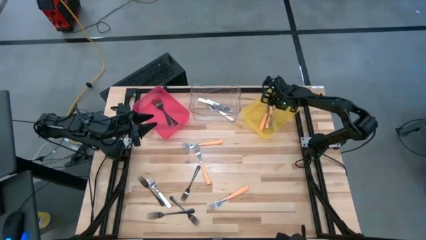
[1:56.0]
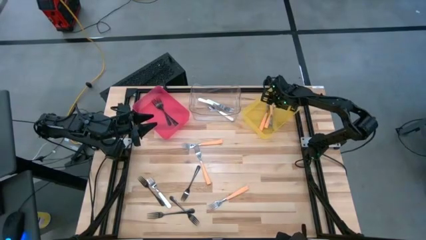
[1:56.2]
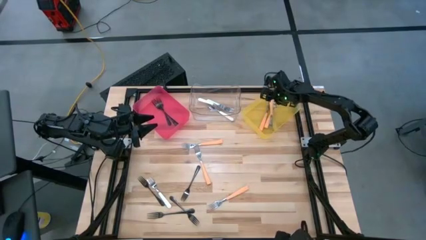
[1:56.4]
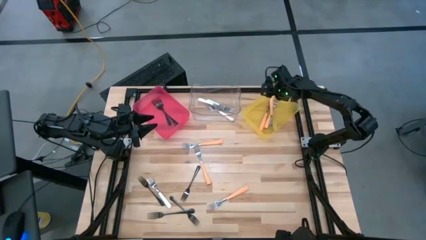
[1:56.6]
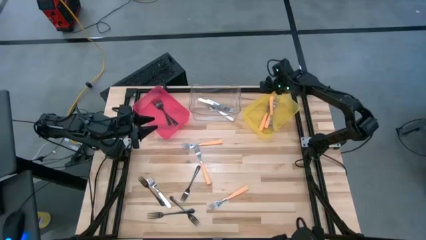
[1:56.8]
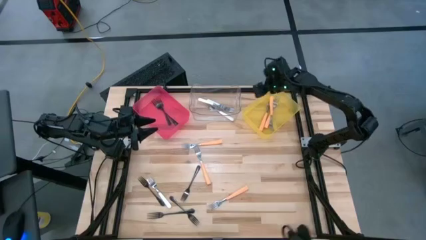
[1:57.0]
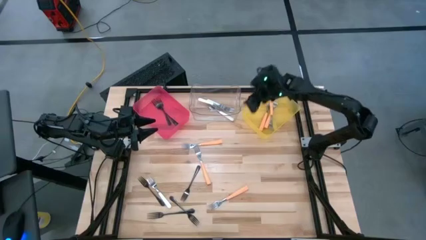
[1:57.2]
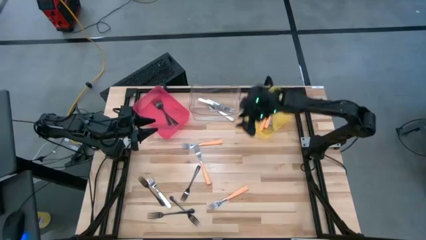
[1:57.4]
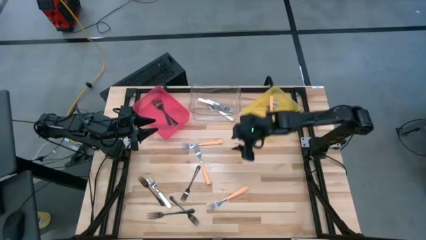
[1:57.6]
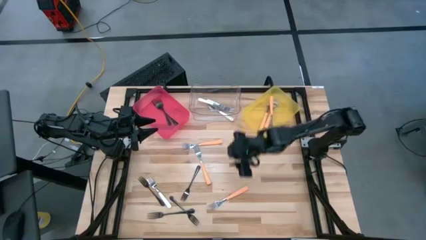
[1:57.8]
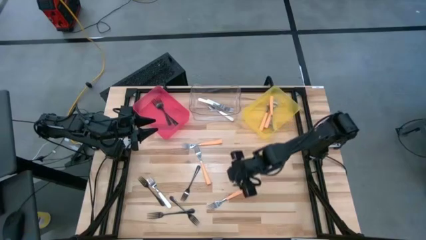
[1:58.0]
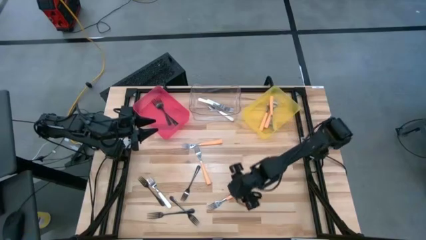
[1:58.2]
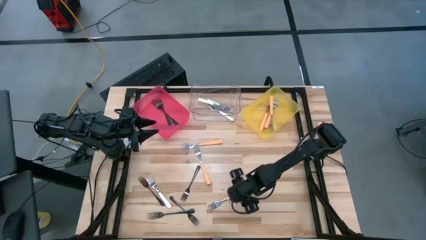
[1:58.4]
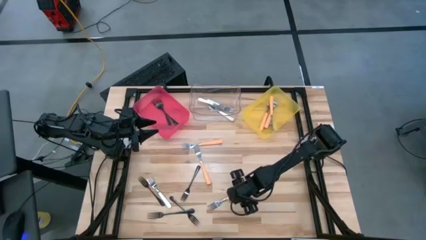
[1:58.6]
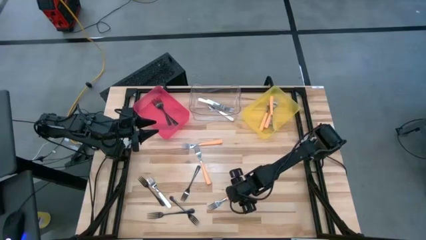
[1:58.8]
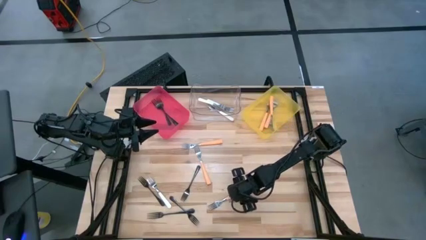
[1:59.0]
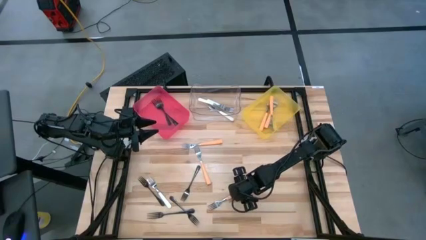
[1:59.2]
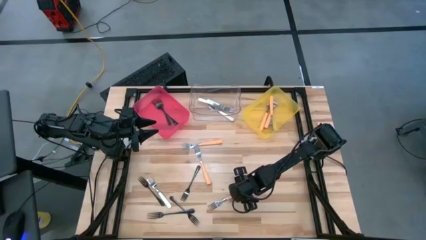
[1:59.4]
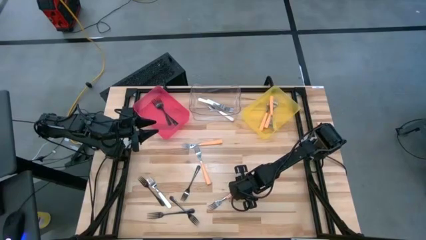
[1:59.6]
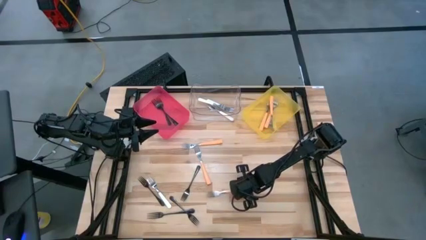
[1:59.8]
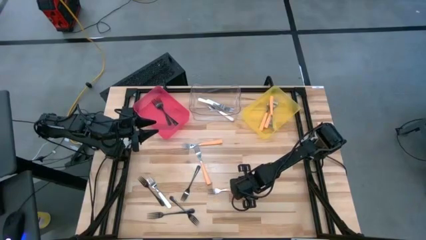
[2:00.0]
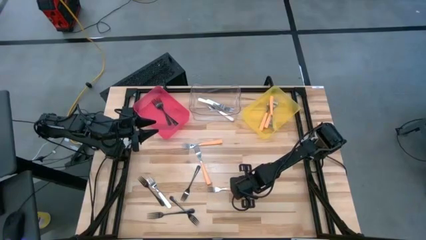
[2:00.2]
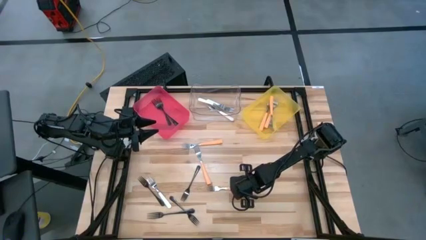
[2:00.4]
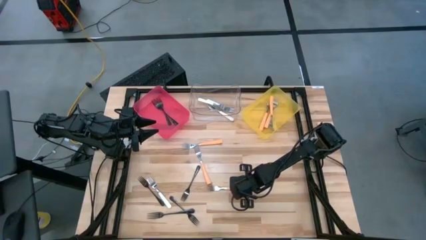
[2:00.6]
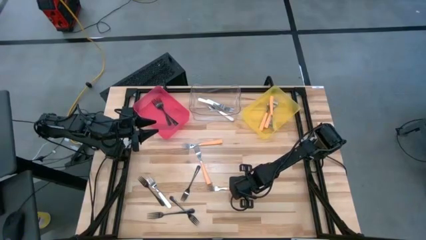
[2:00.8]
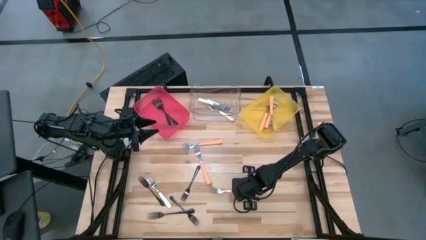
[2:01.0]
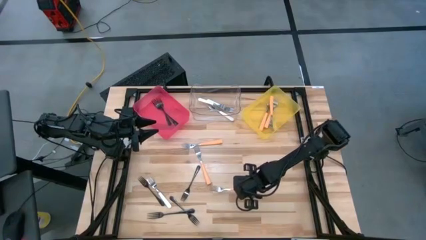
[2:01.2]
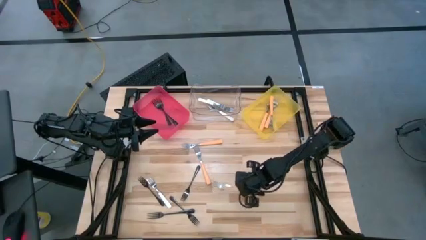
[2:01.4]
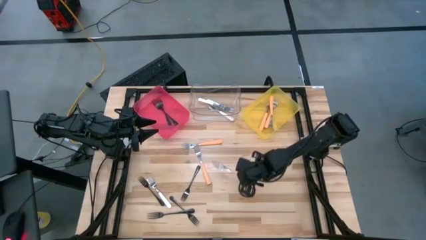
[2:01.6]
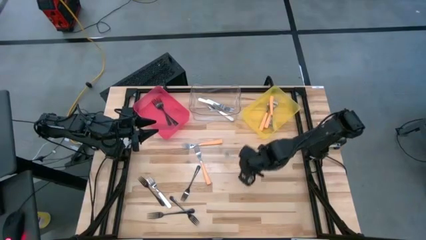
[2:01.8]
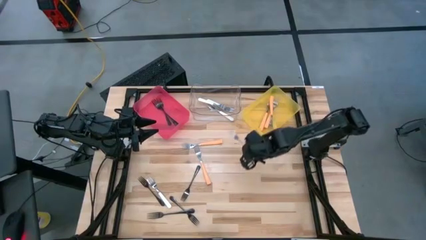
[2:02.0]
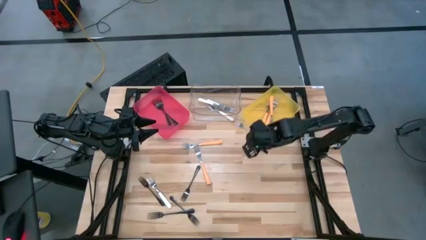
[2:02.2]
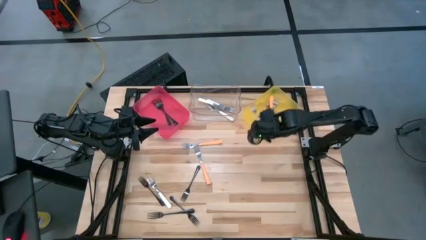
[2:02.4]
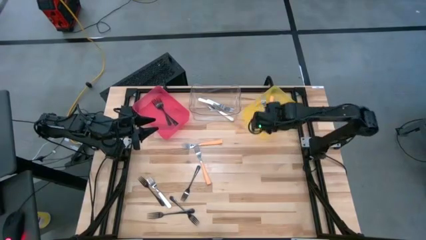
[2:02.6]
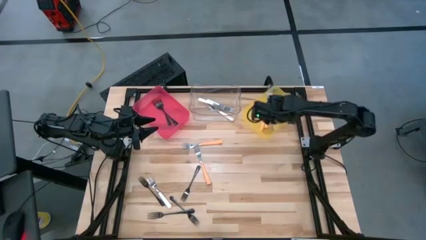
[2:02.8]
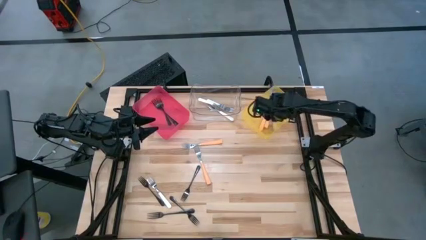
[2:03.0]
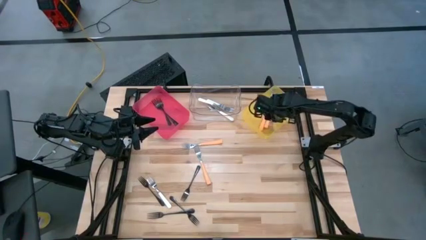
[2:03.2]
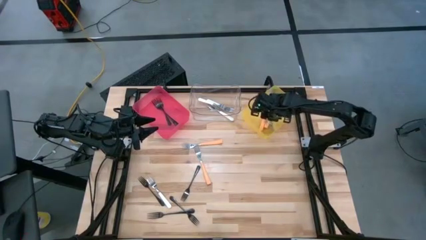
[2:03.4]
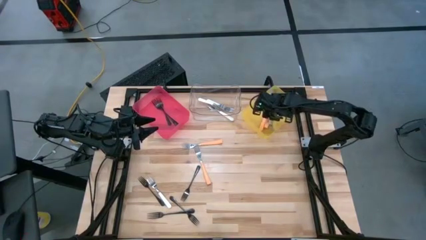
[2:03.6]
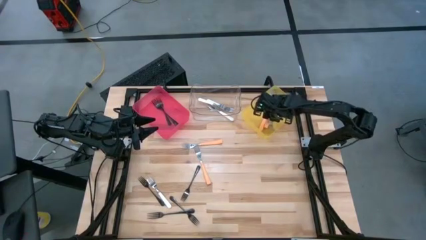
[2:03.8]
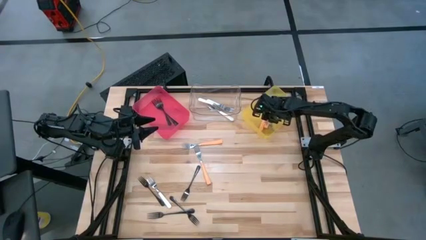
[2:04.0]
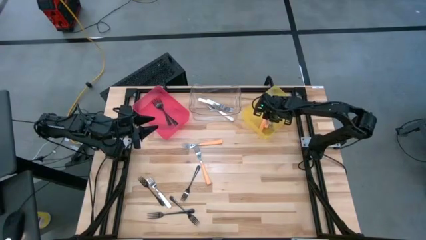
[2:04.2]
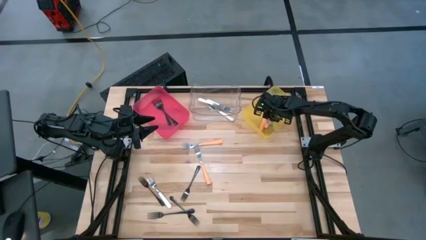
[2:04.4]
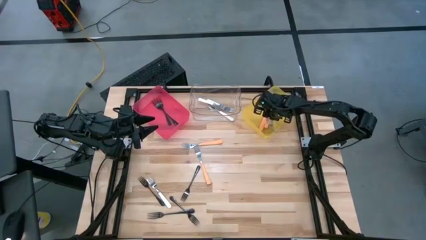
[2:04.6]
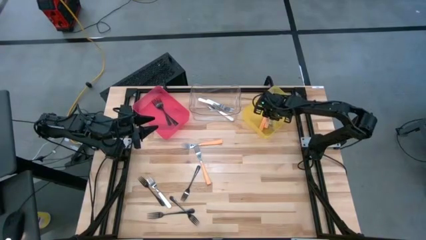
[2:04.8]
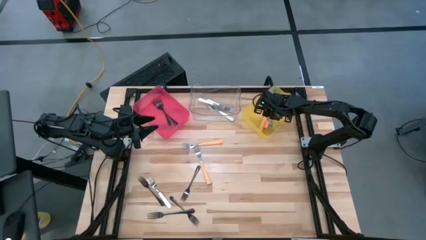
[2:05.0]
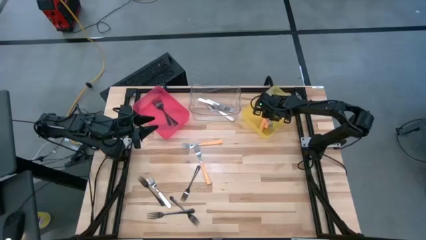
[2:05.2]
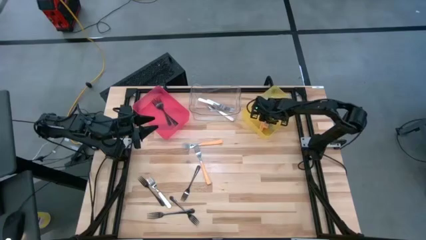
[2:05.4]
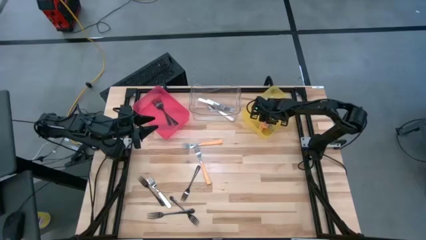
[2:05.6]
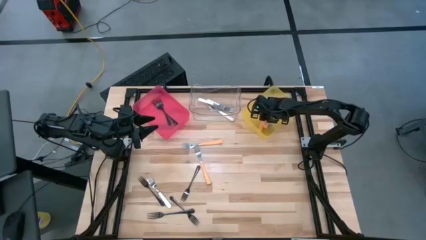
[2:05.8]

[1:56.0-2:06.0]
Task: Sort silverware by color (type)
Put the orange fork into the yellow bin

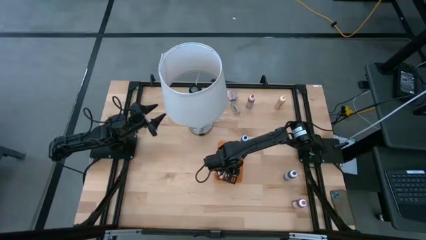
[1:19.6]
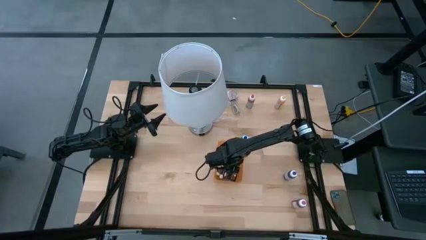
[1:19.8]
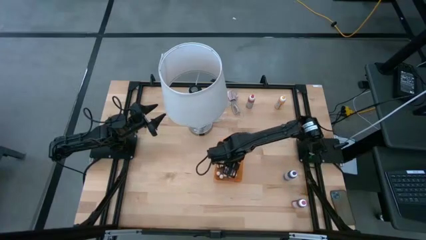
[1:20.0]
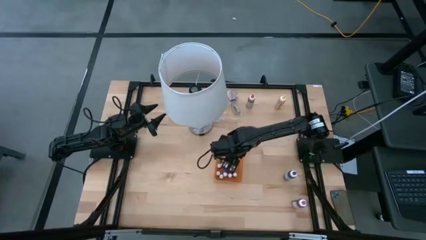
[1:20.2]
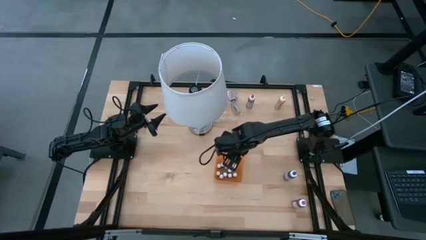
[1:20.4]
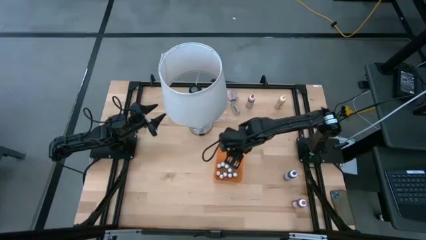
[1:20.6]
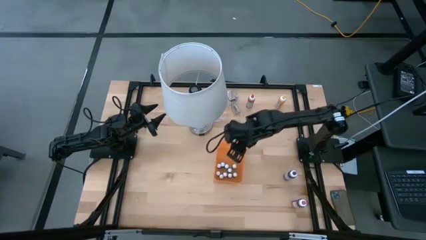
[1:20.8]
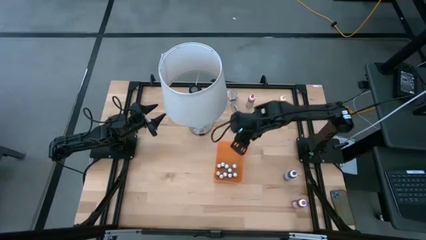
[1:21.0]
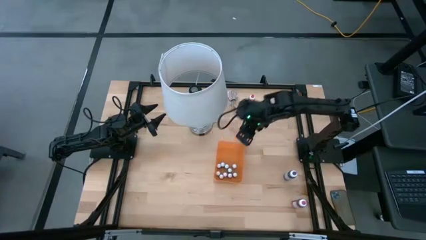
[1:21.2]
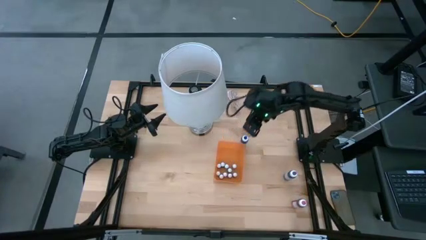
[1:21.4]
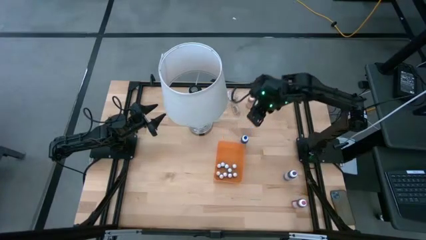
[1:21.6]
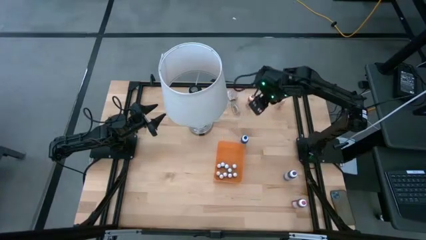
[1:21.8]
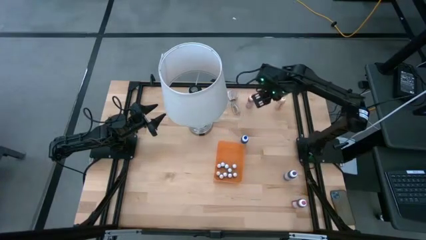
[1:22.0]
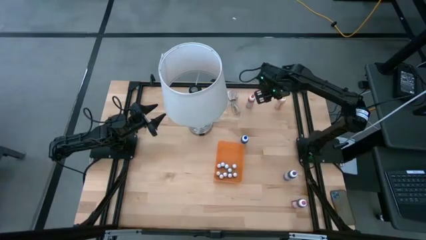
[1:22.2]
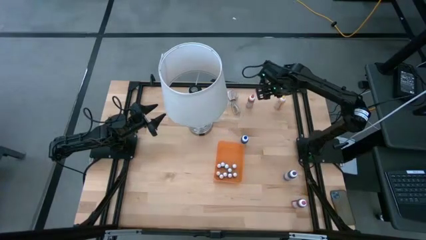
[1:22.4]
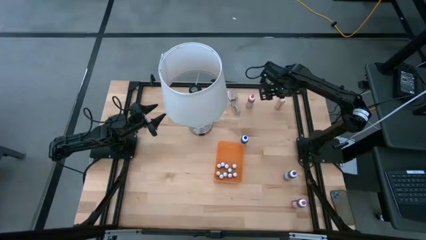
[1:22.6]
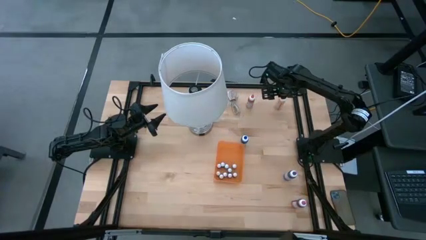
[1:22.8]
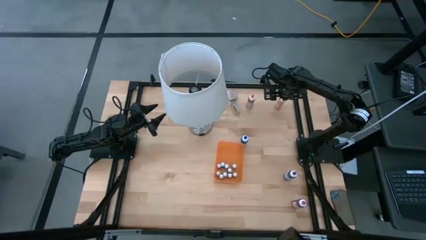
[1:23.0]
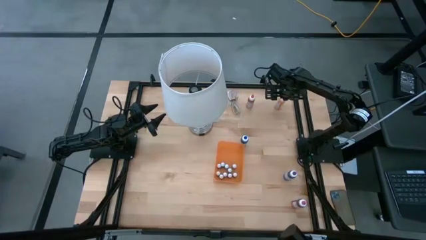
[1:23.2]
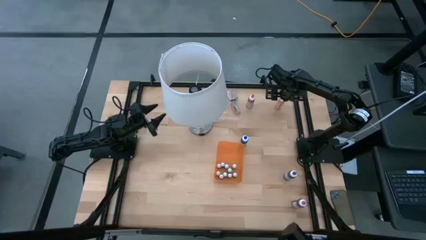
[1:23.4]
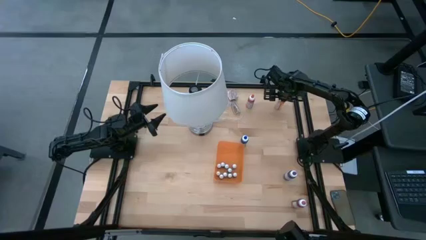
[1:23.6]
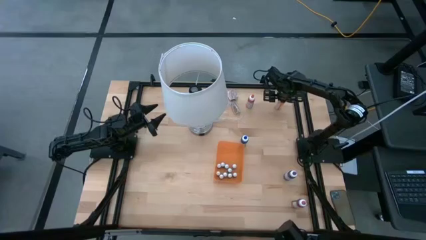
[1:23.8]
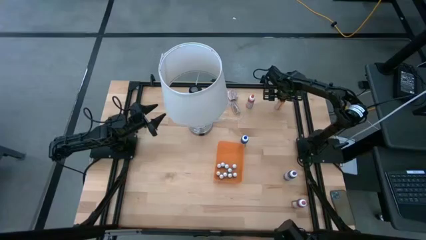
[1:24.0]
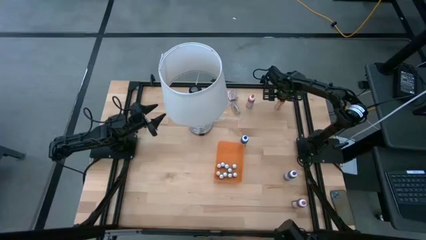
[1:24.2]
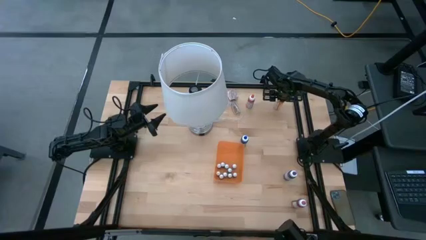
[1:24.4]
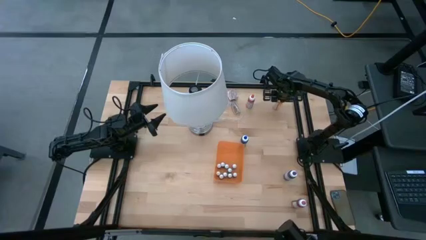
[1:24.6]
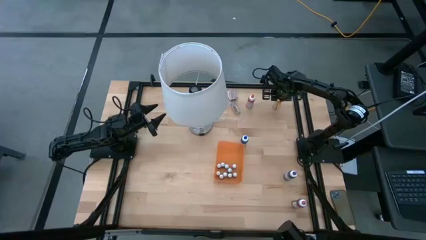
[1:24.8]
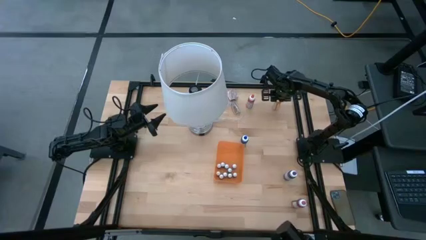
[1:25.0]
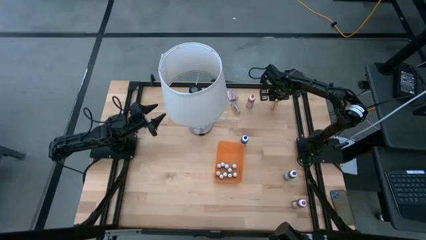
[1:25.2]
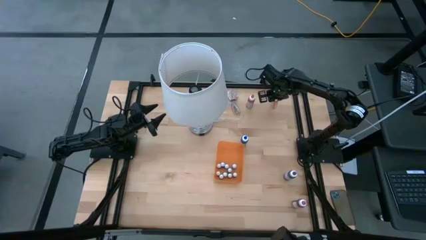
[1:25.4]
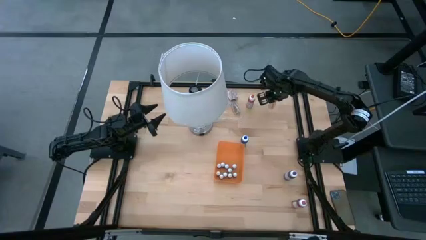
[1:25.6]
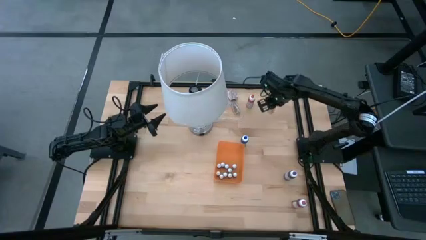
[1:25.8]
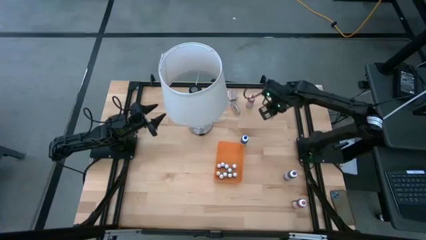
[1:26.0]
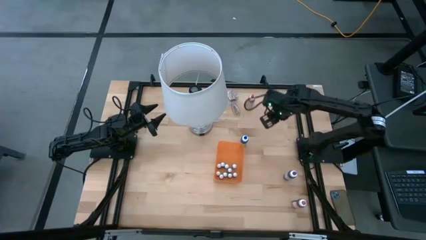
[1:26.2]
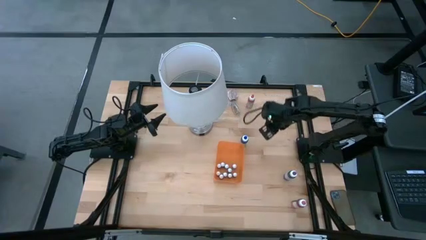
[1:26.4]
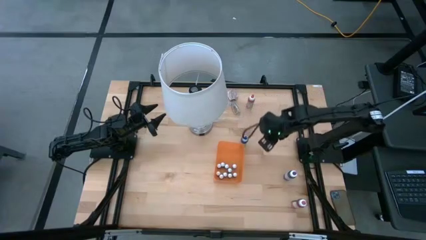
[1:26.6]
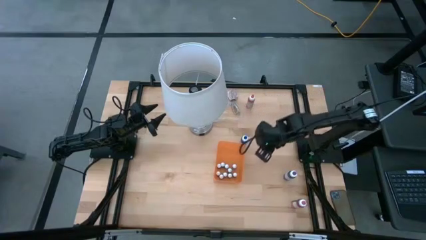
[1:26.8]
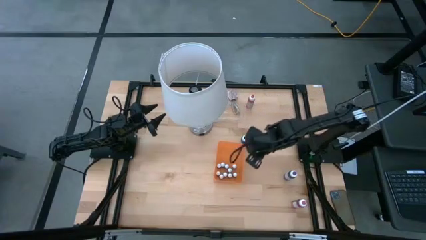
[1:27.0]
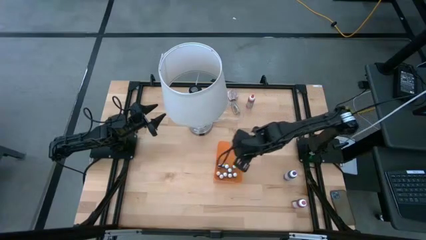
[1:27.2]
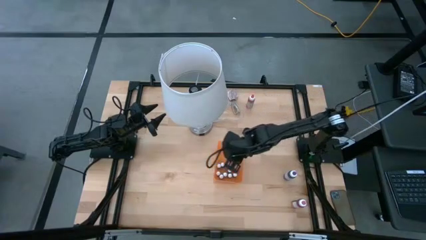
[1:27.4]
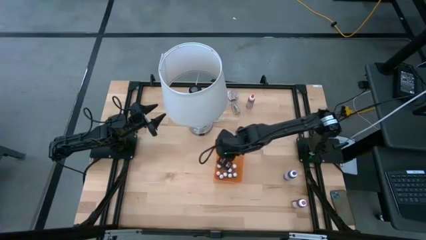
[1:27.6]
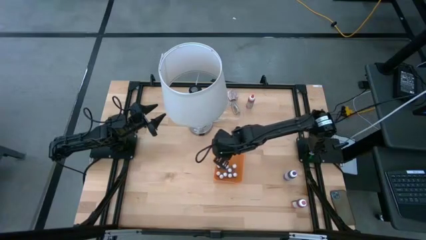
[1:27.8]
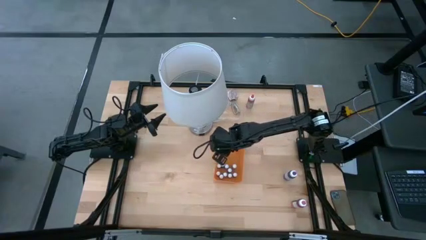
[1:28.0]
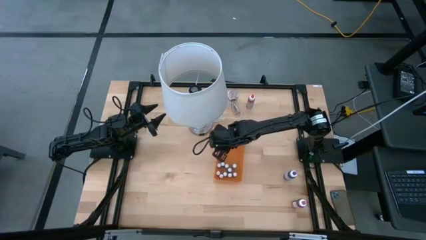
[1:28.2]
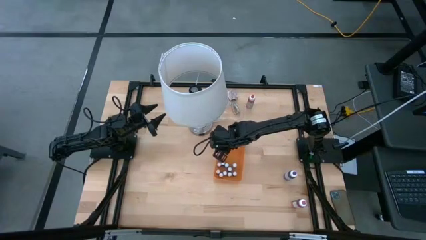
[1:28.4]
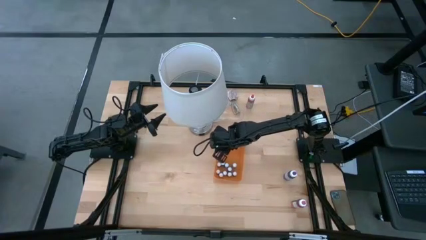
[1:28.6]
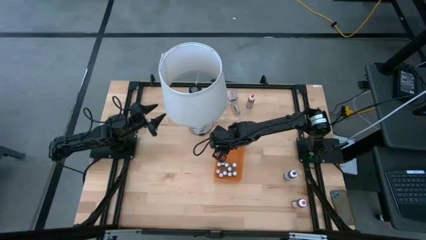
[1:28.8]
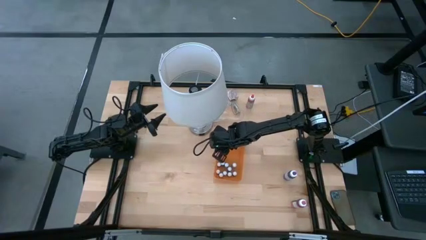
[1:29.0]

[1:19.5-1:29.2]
Task: Pick & Place food coloring
Put the big yellow food coloring bottle into the orange bin
